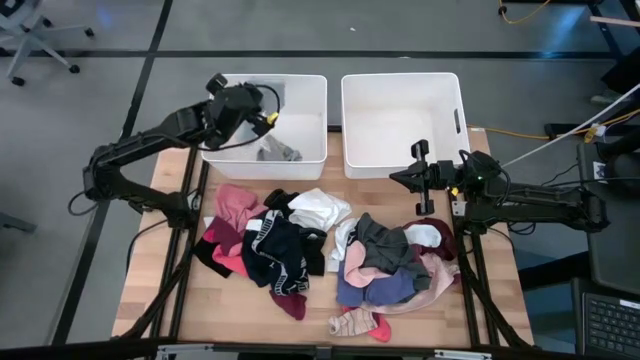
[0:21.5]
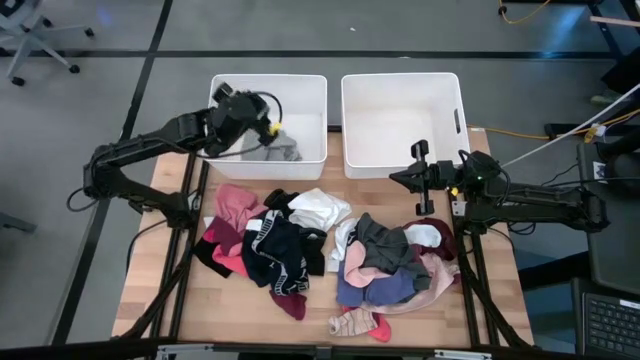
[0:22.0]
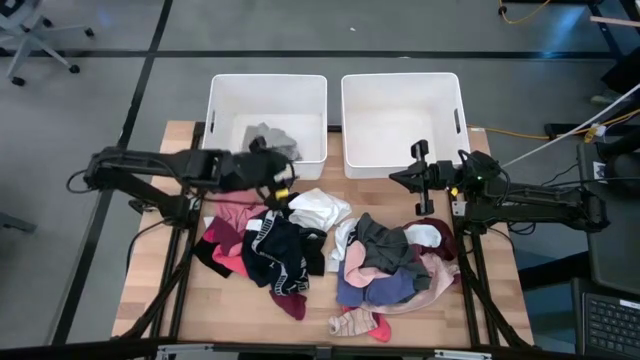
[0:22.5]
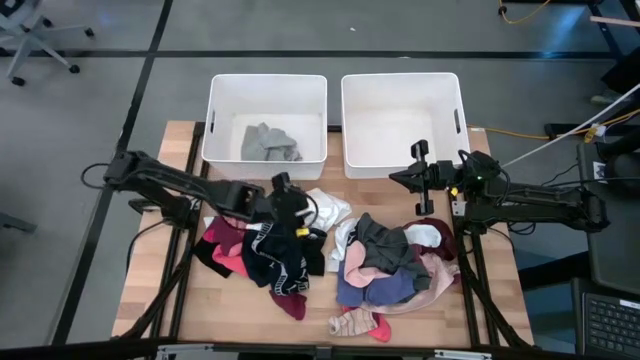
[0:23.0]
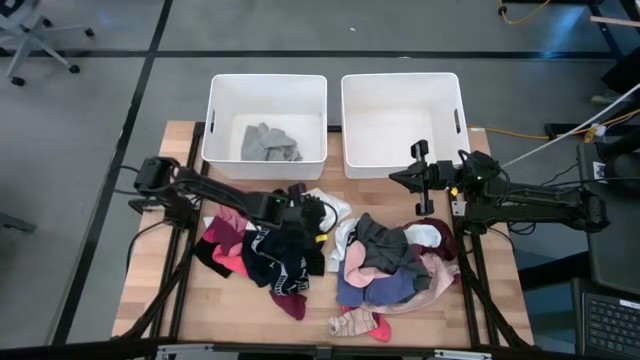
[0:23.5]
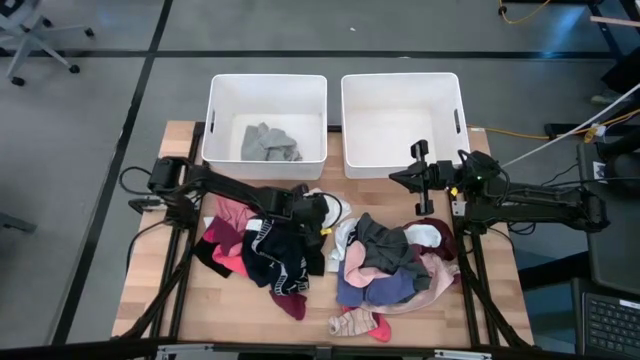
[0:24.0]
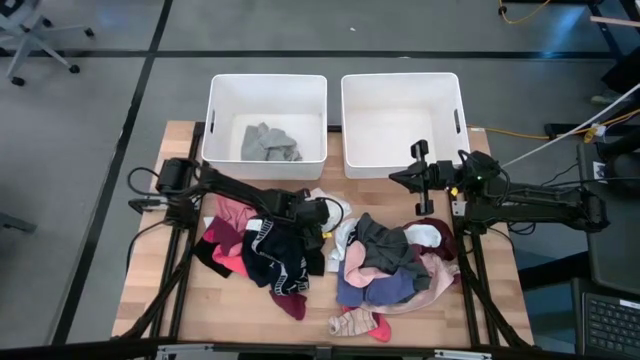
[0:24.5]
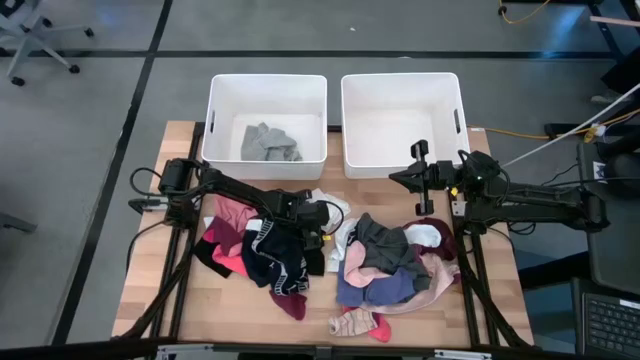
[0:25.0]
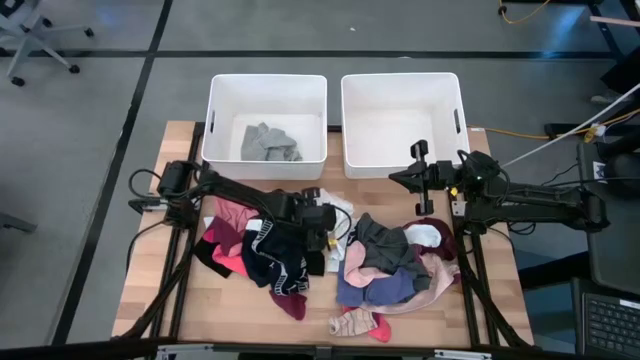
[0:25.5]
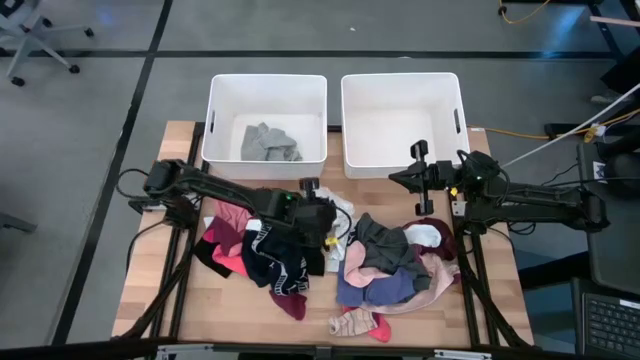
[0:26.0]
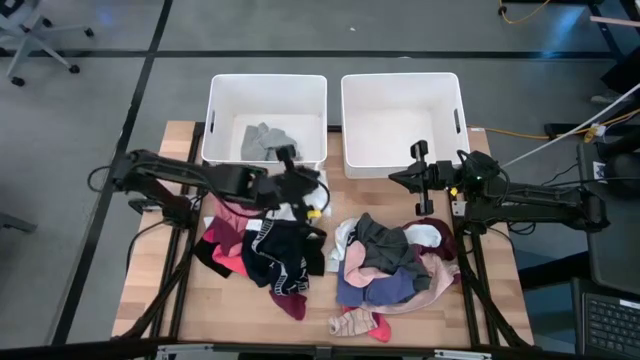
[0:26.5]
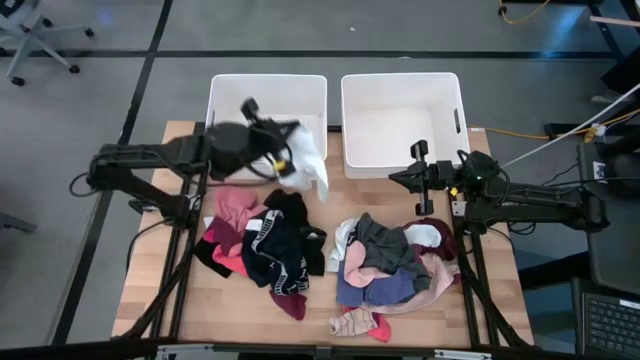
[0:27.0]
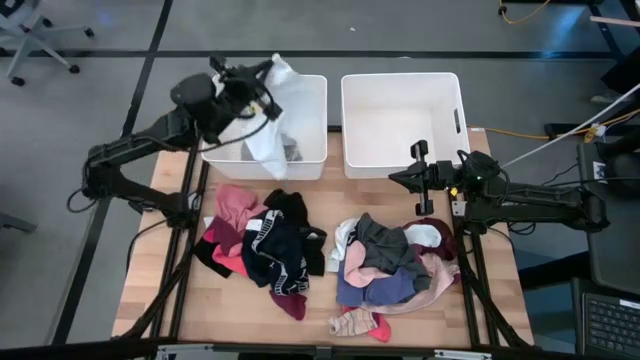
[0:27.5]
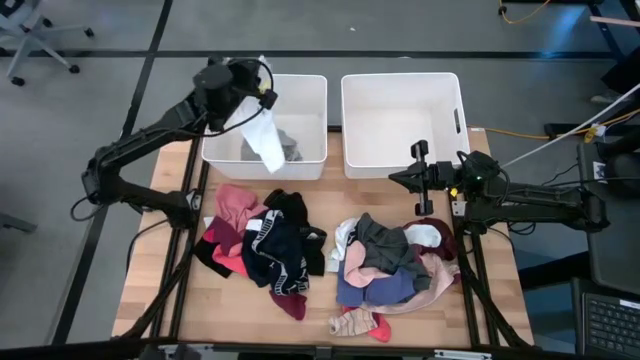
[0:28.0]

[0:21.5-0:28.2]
Task: Sort clothes
Put the white cycling short into the left white laundry bin

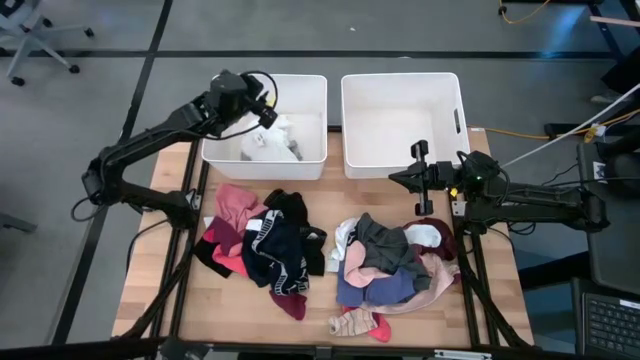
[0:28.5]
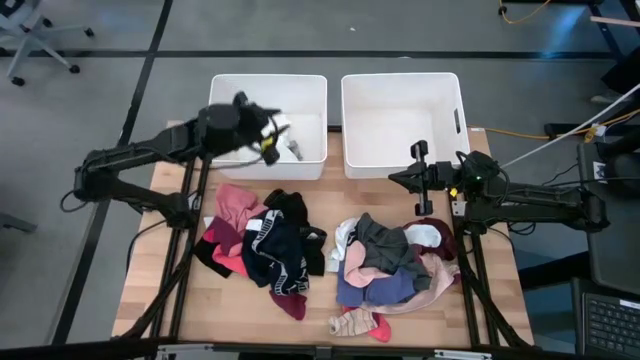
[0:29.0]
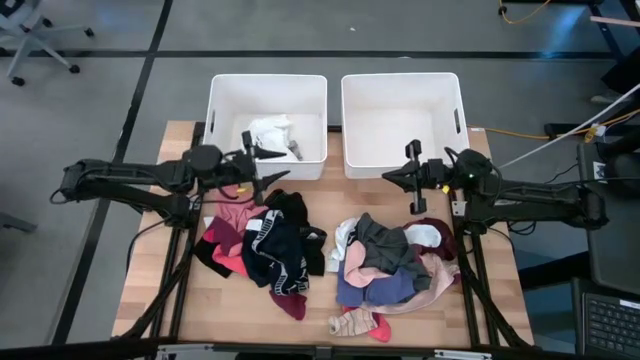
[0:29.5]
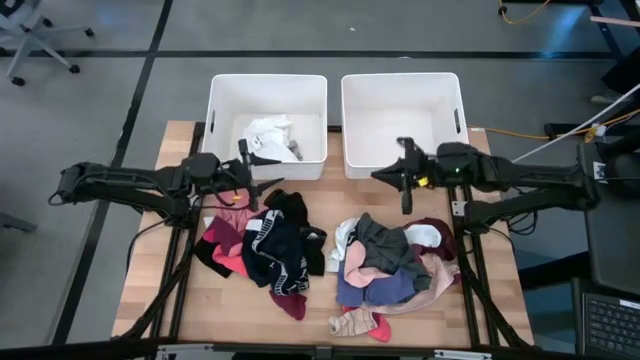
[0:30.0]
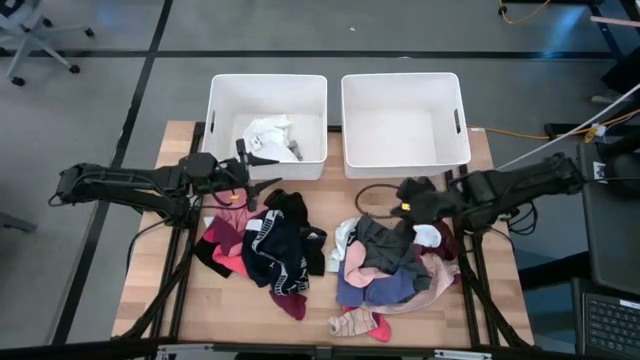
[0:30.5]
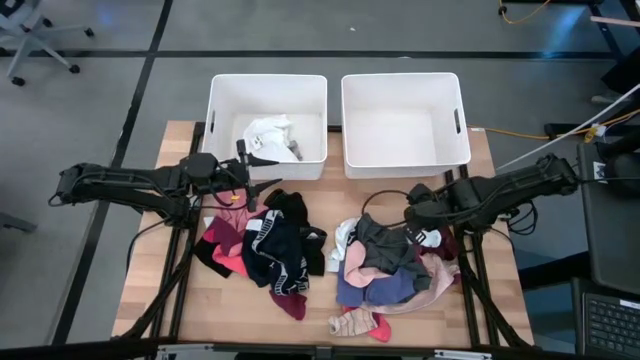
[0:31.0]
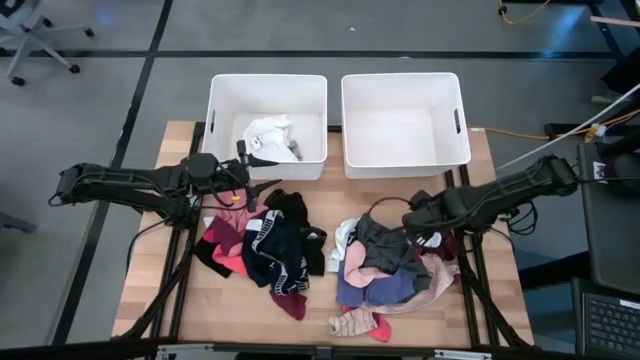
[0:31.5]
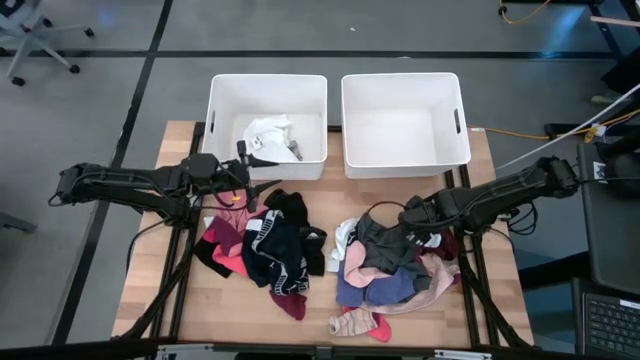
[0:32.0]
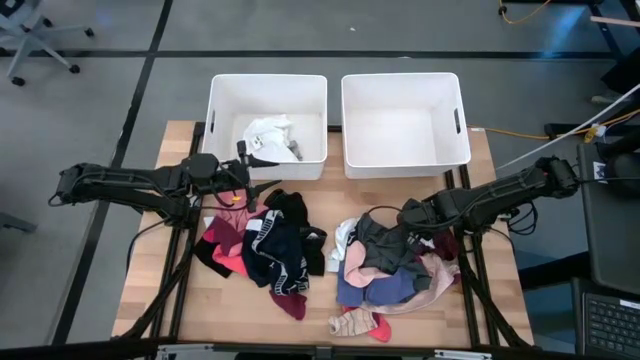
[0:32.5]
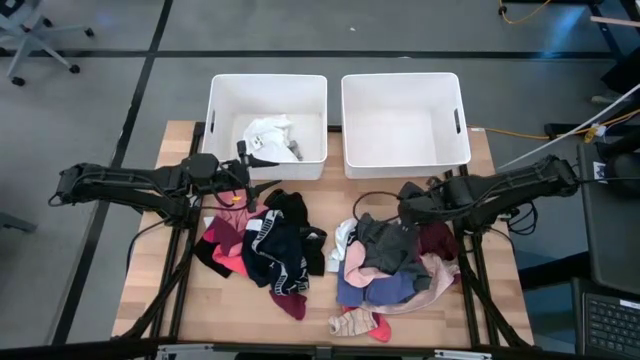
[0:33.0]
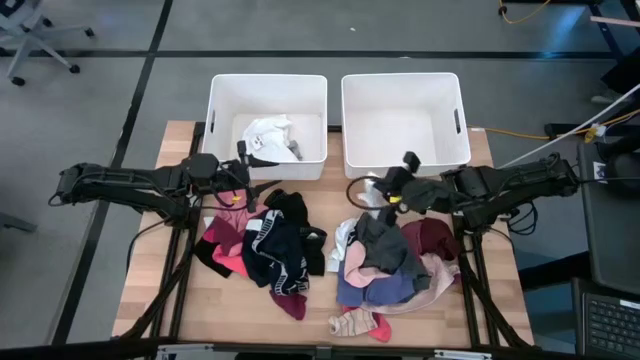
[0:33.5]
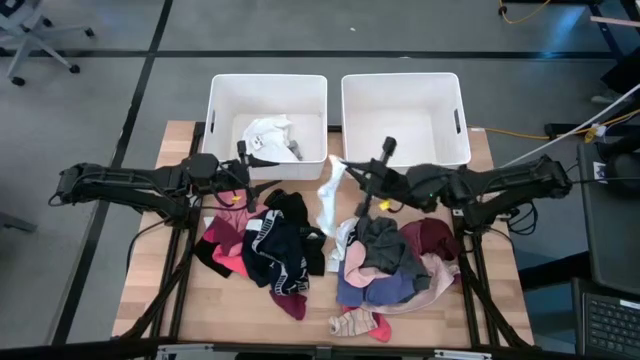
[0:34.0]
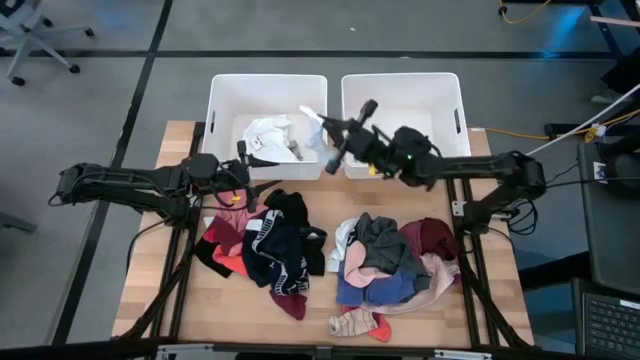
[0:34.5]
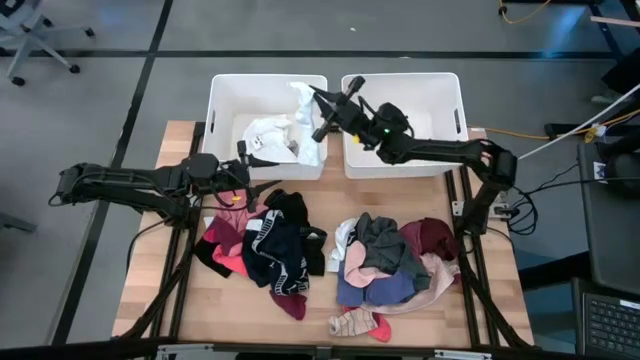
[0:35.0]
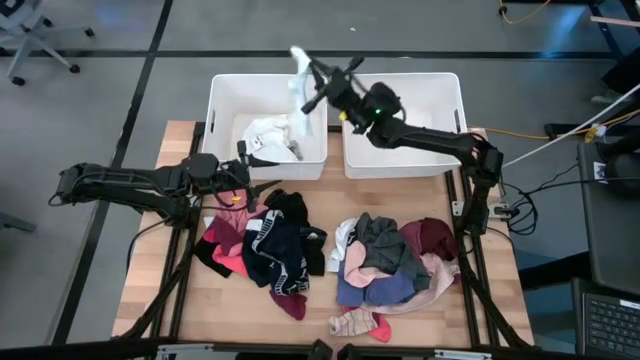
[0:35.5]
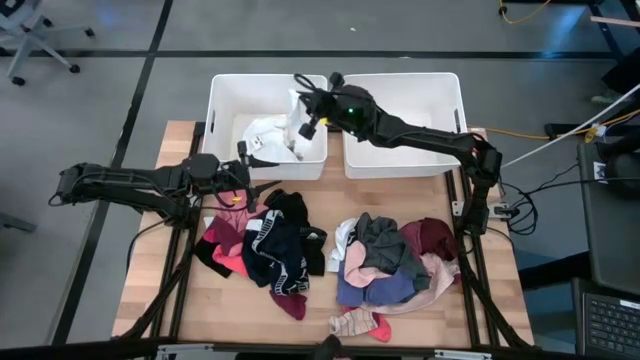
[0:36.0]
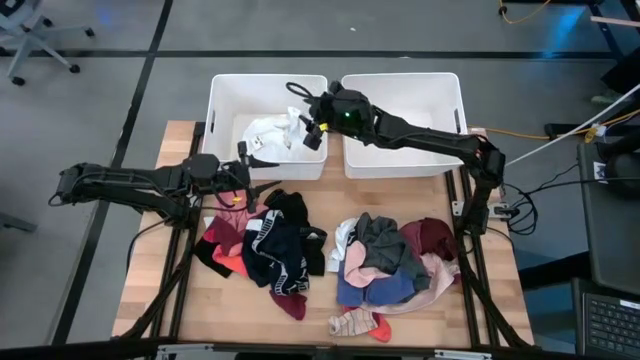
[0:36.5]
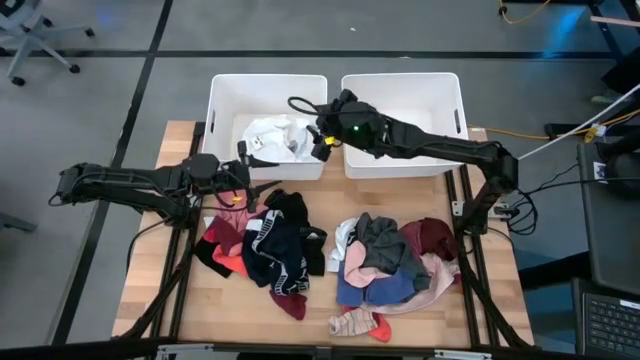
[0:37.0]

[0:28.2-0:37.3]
Put the right white sock into the left white laundry bin

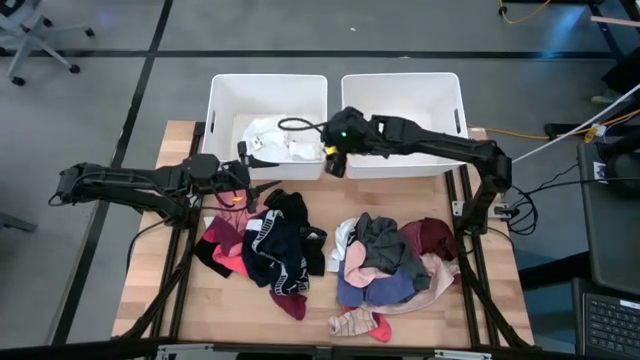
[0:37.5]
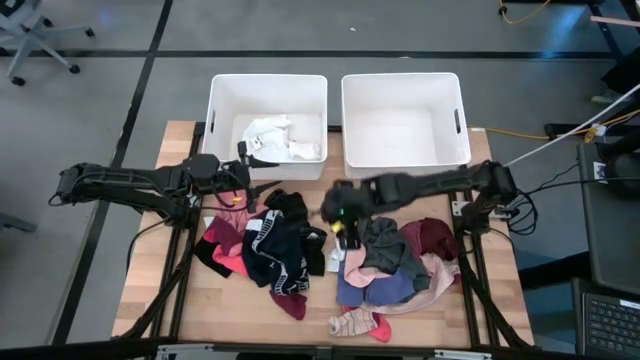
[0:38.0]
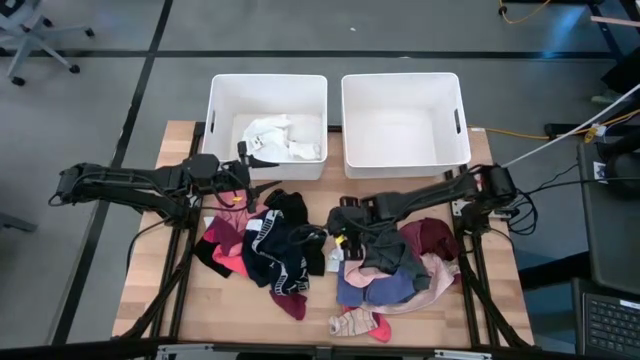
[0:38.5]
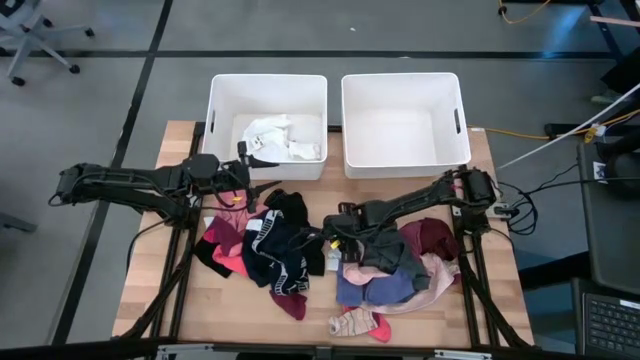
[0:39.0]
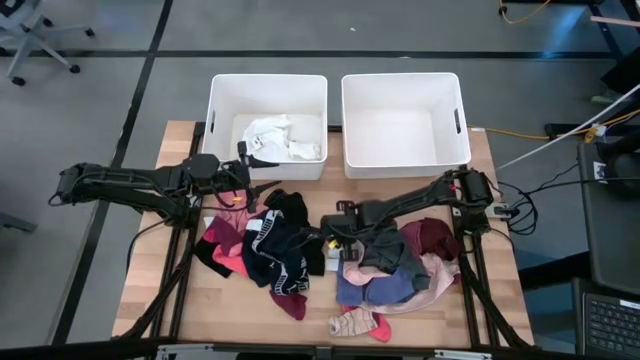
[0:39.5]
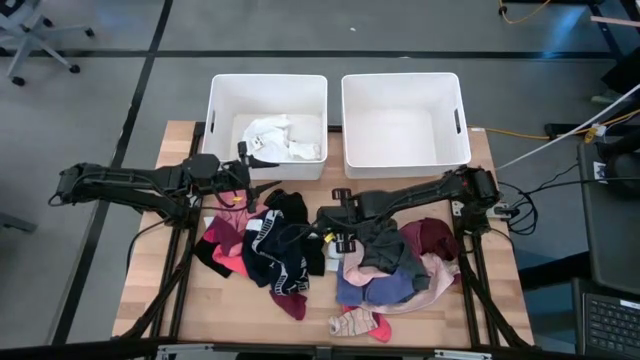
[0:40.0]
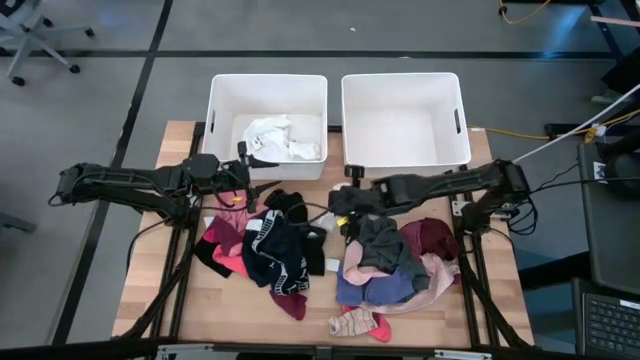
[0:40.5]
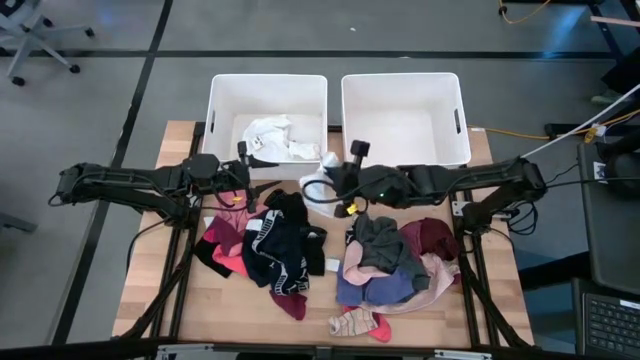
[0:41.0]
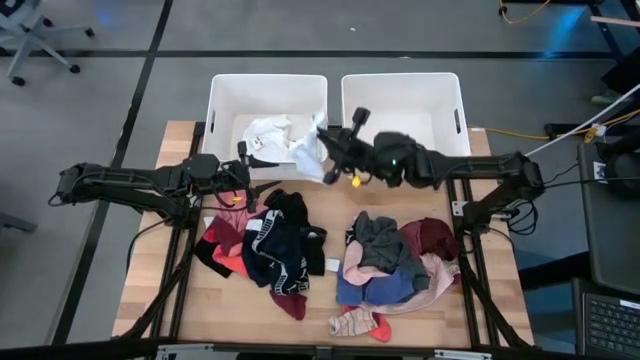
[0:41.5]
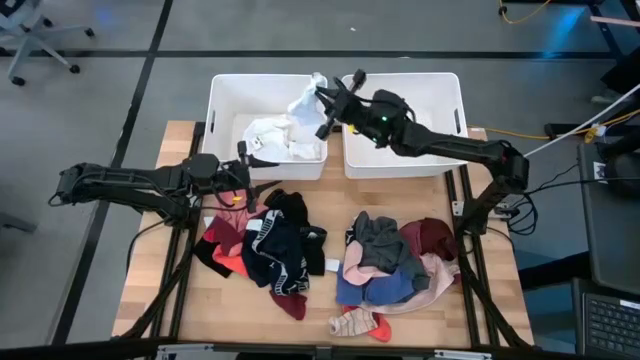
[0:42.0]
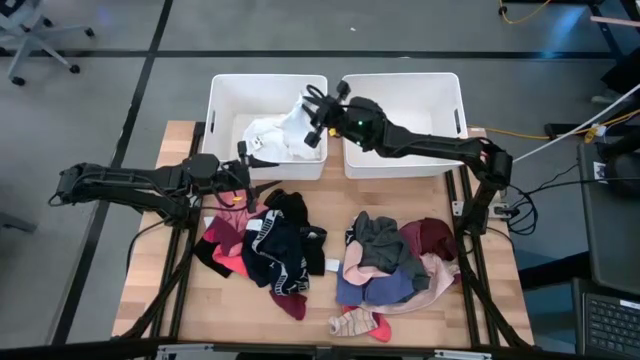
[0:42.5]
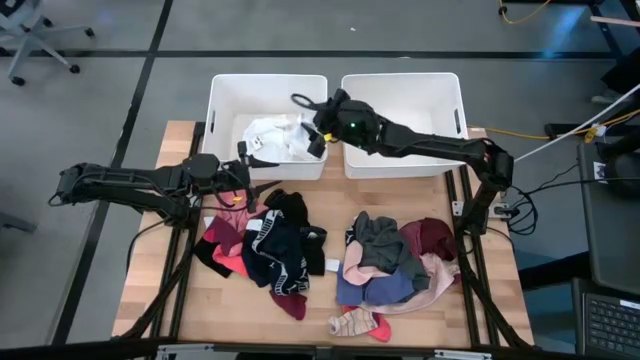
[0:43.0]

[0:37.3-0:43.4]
Put the white sock into the left white laundry bin
